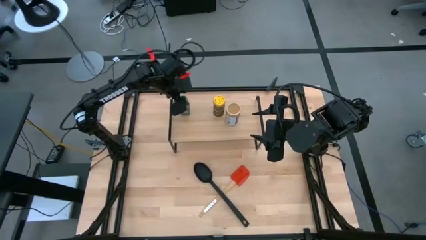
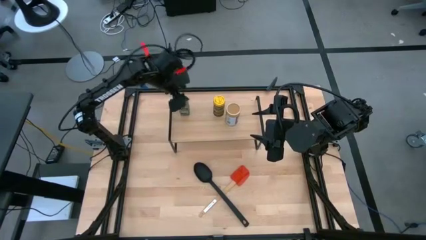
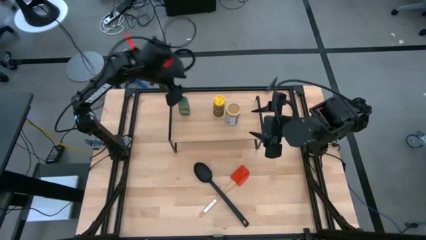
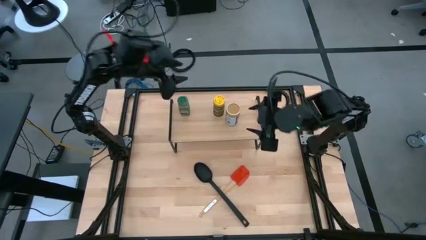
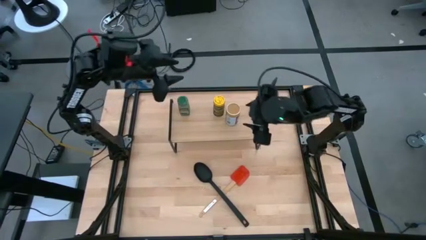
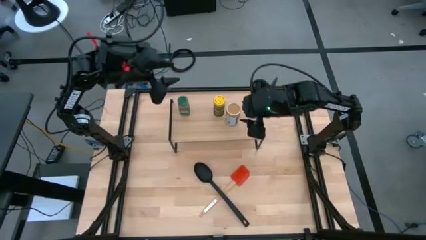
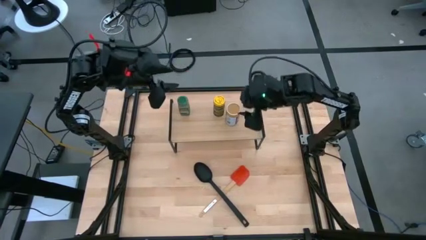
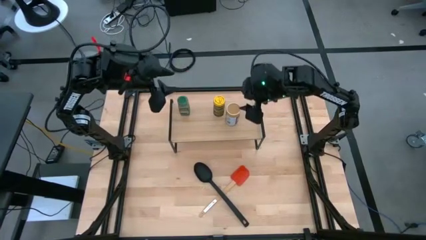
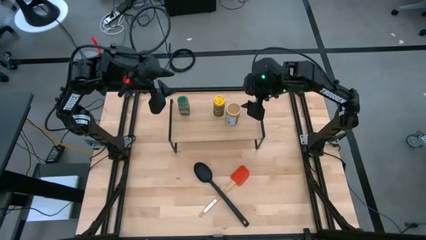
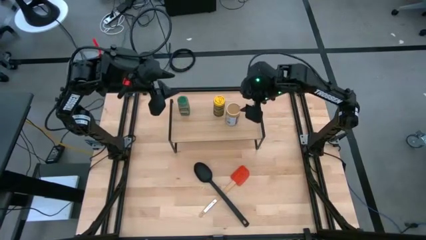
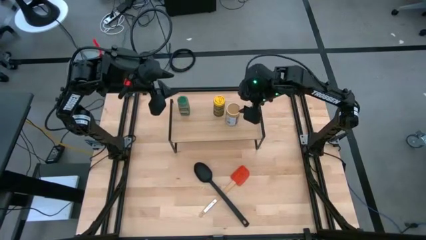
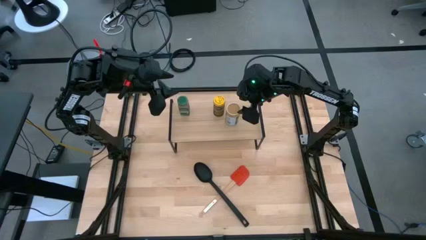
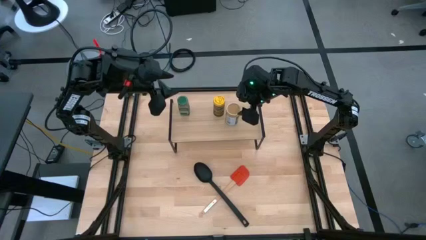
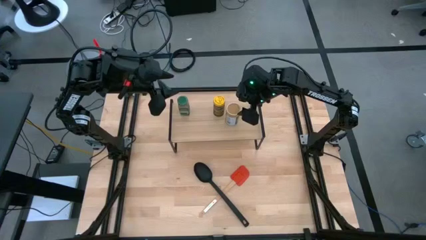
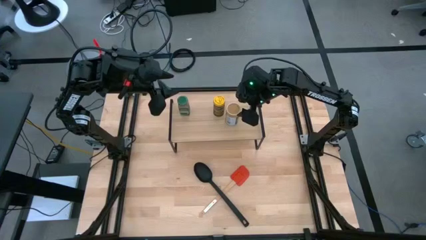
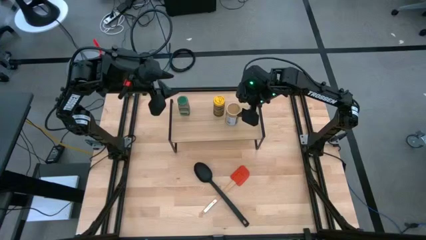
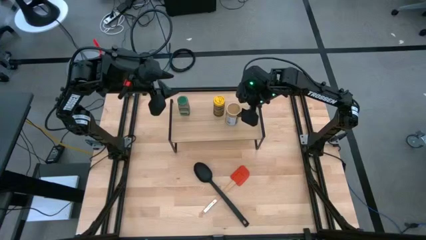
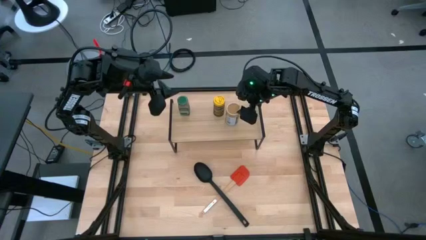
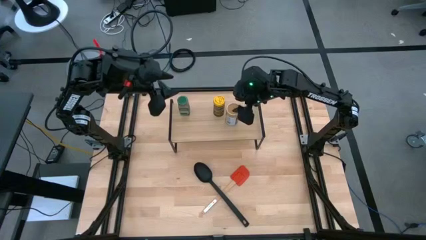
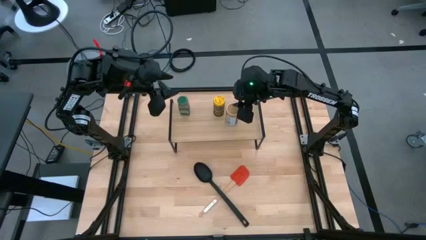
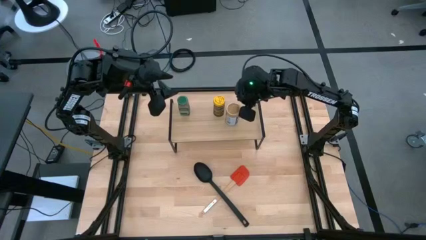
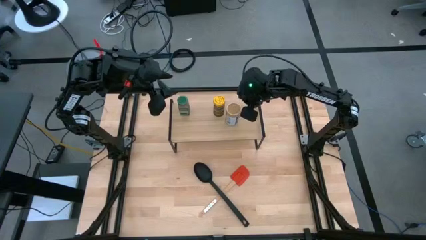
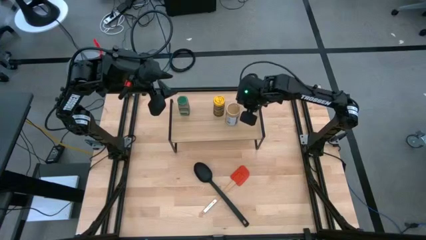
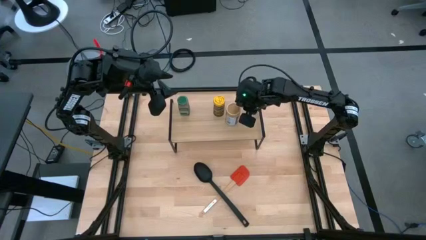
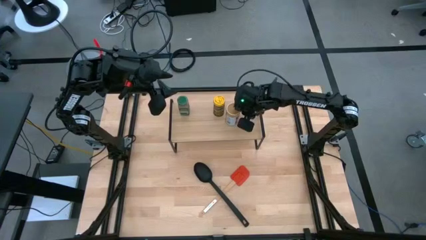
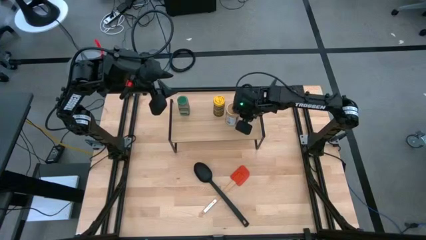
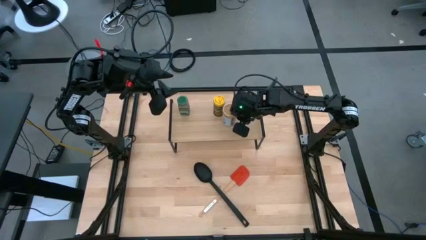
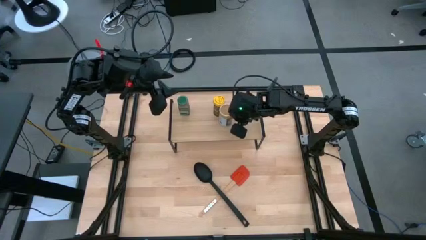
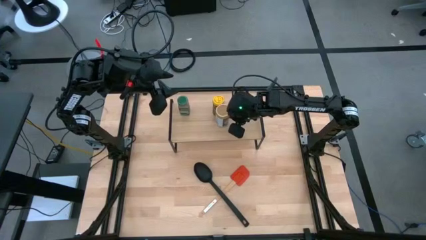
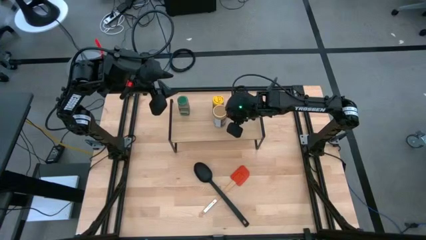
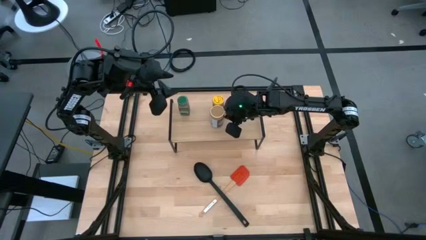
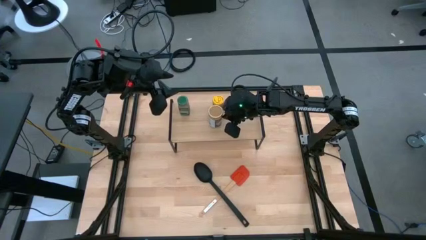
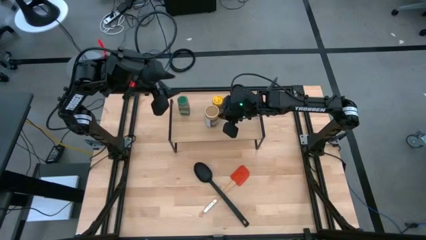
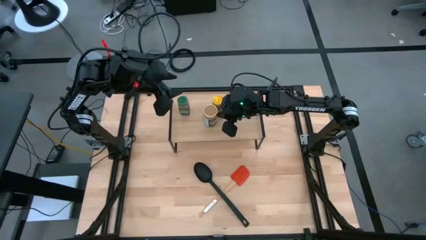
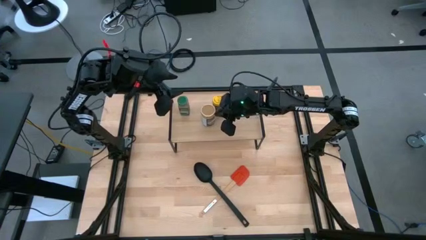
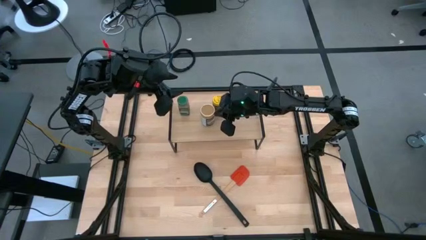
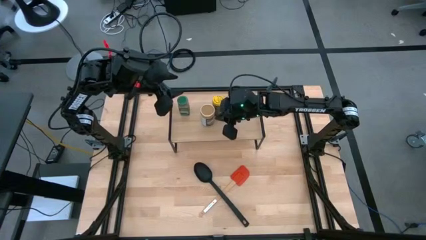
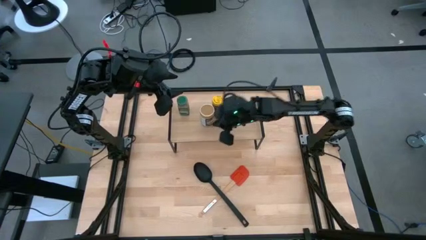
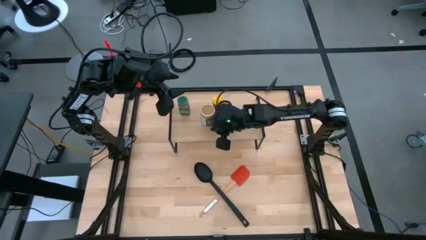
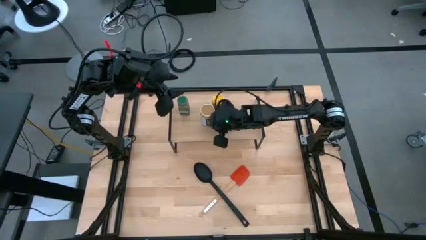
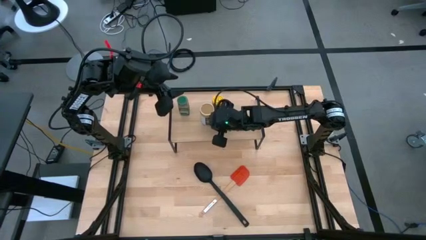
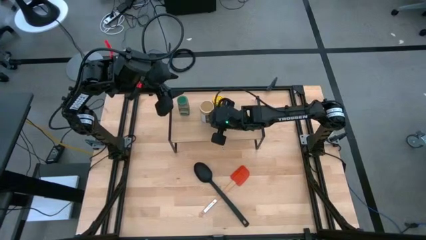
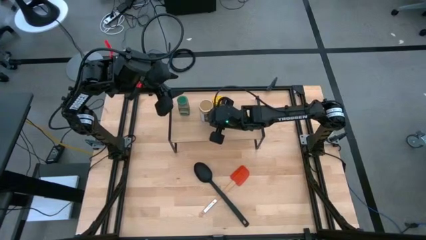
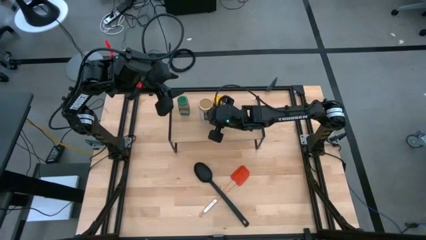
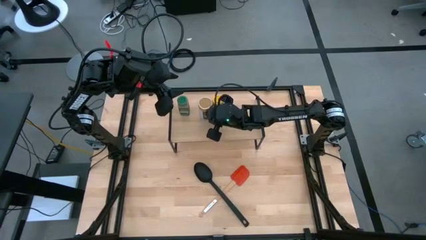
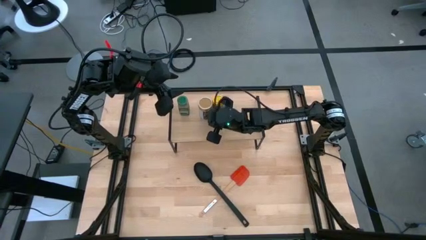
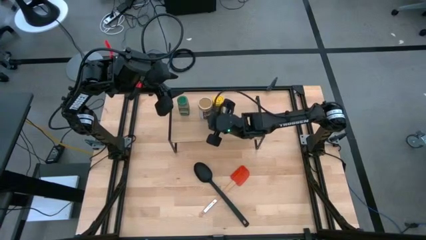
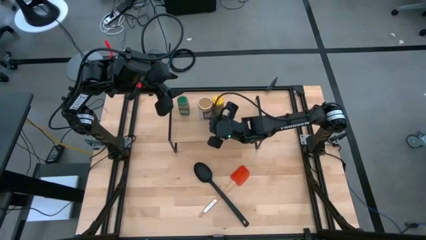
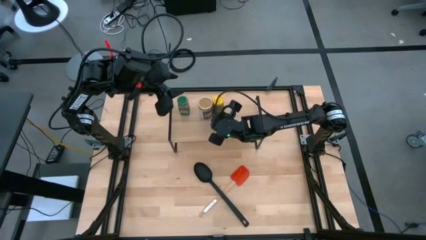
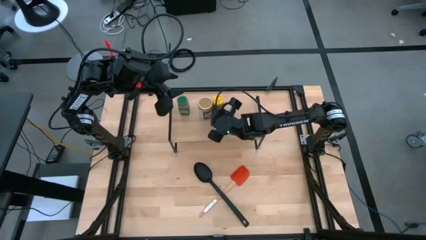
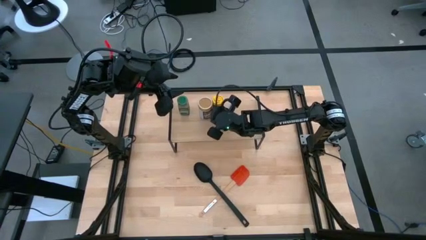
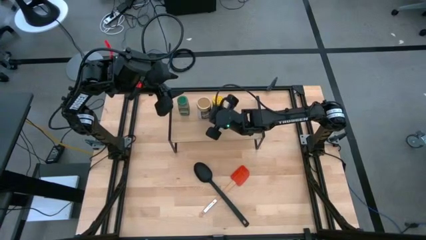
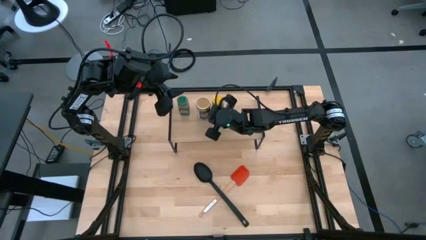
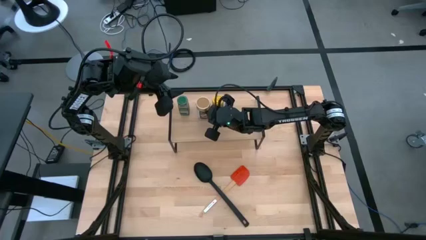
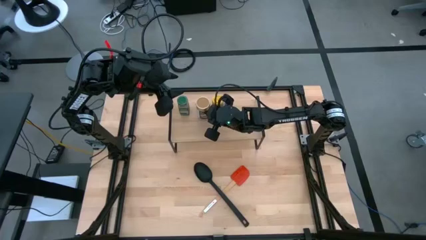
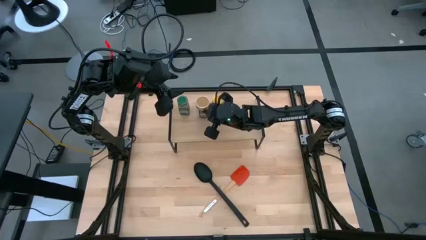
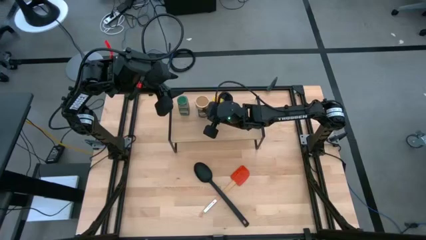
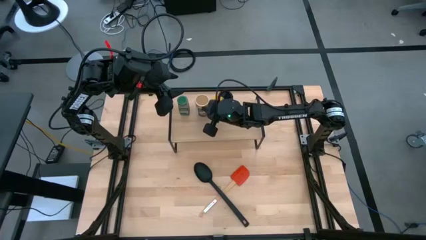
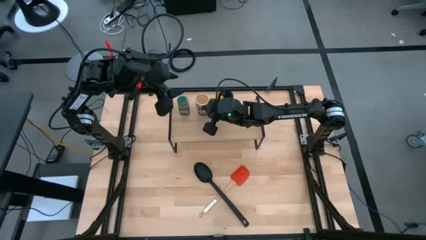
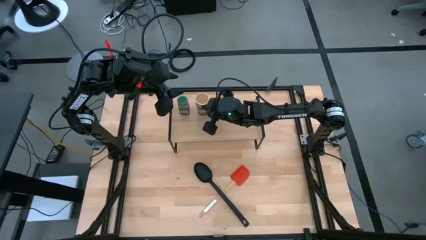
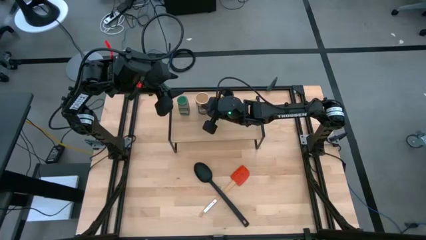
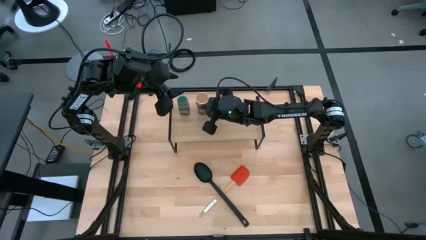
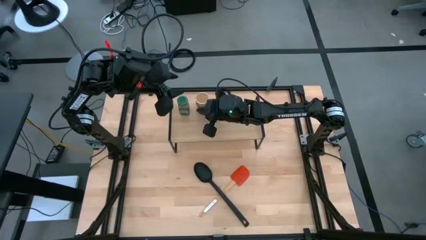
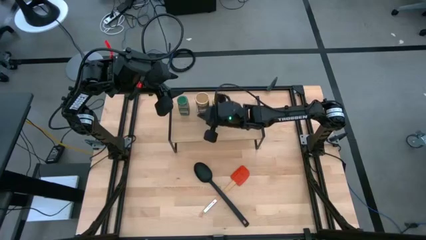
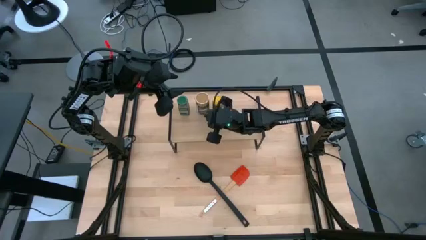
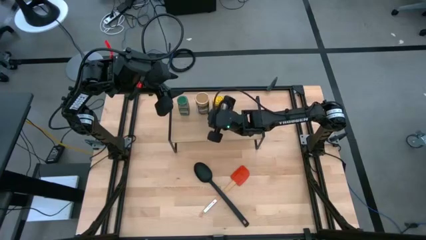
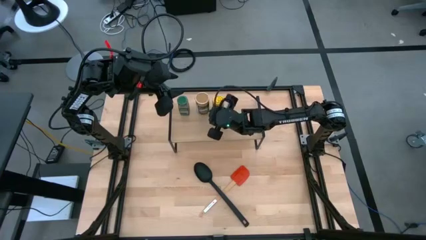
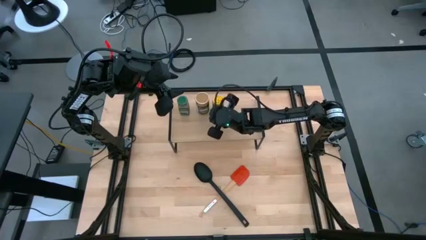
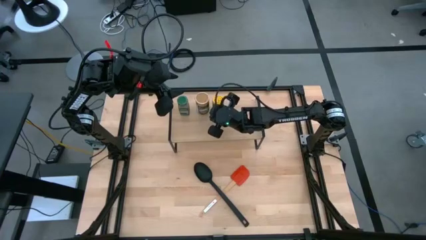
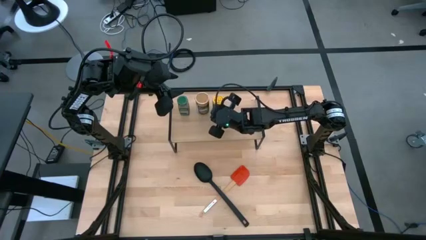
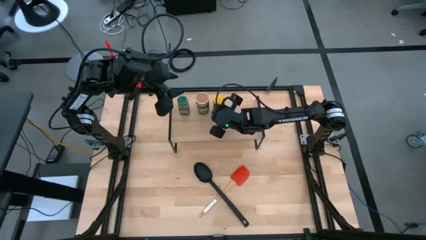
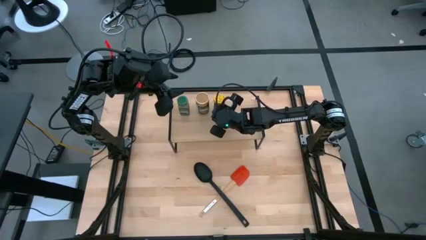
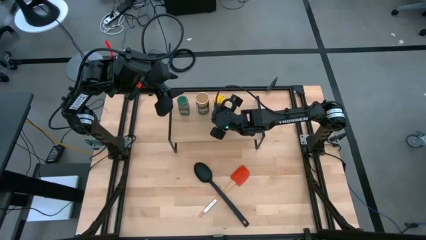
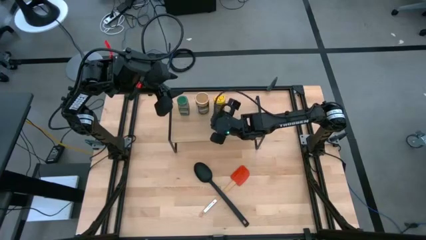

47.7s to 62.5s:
Task: Shelf spices
Adjust the seasoning bottles on the shelf
